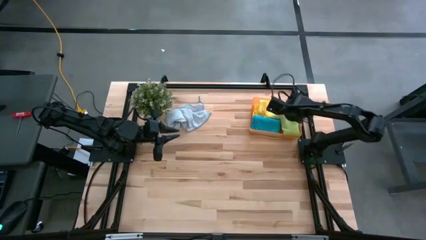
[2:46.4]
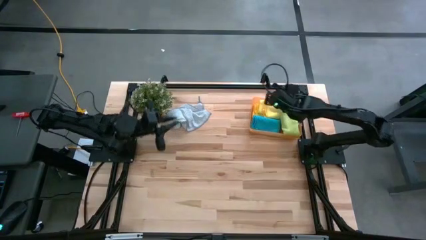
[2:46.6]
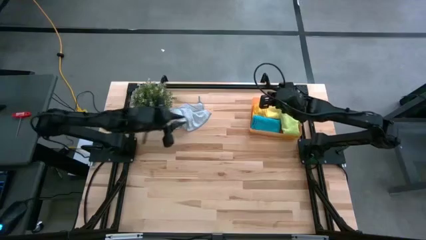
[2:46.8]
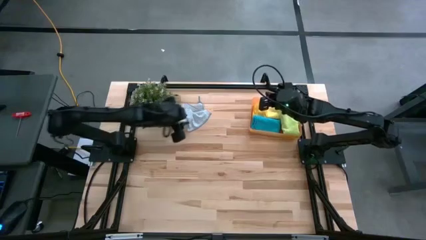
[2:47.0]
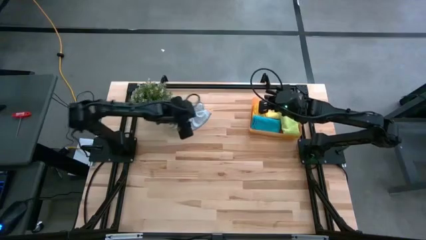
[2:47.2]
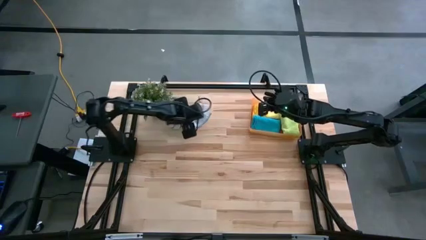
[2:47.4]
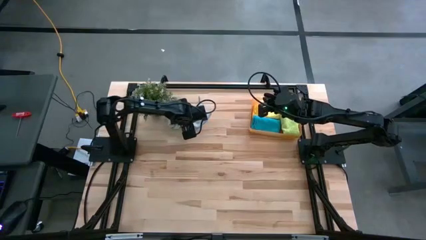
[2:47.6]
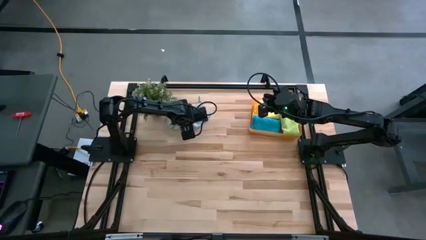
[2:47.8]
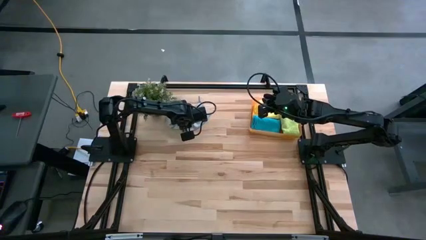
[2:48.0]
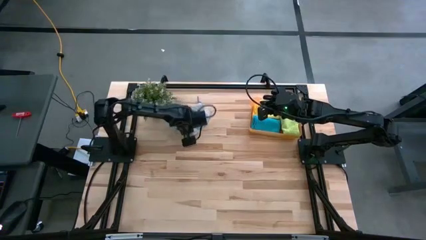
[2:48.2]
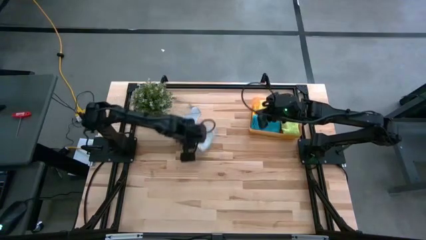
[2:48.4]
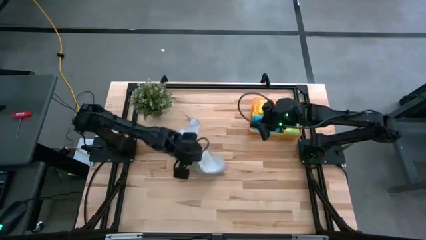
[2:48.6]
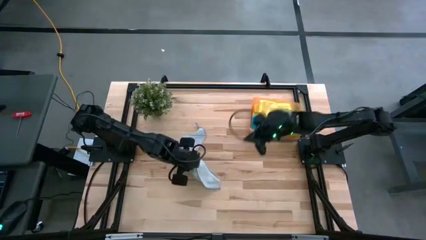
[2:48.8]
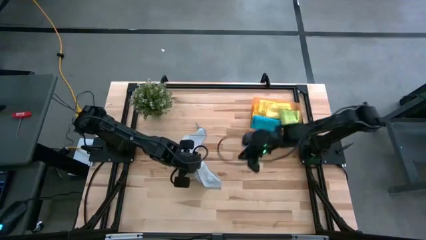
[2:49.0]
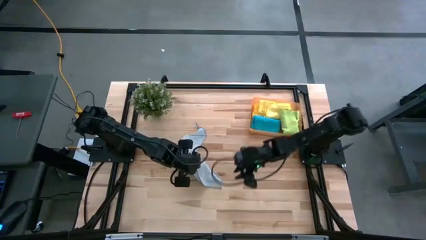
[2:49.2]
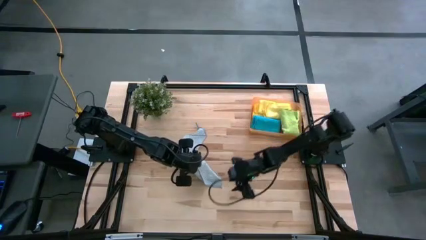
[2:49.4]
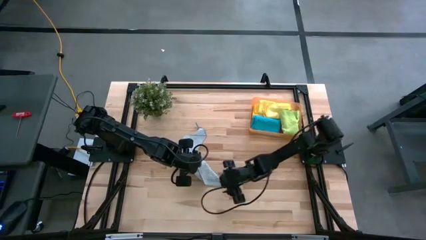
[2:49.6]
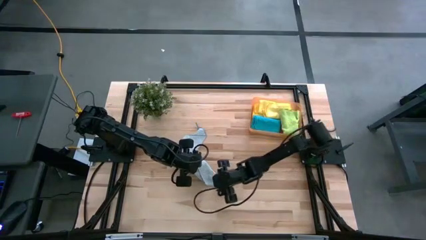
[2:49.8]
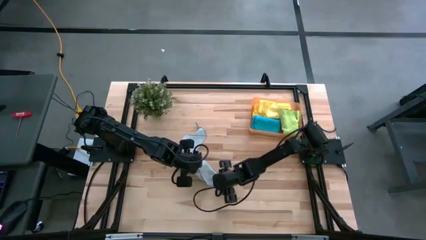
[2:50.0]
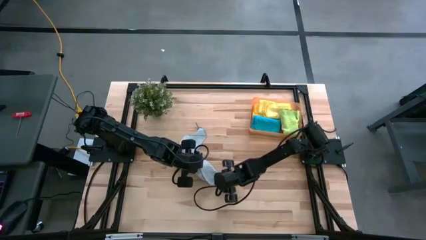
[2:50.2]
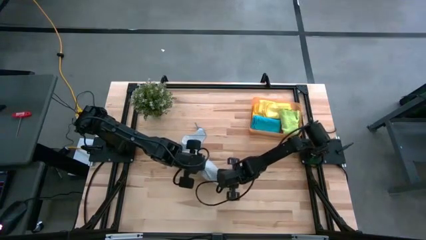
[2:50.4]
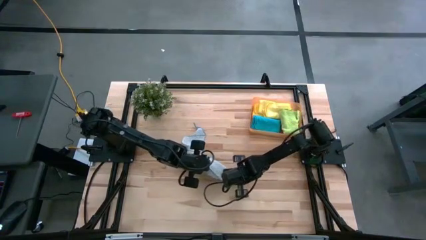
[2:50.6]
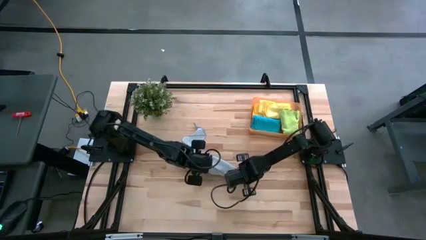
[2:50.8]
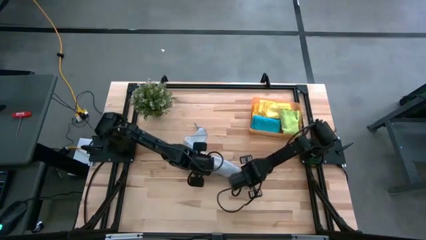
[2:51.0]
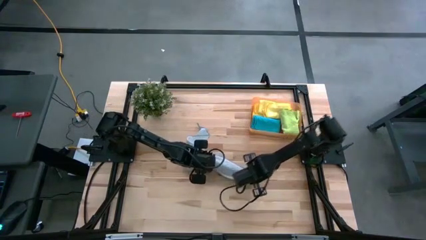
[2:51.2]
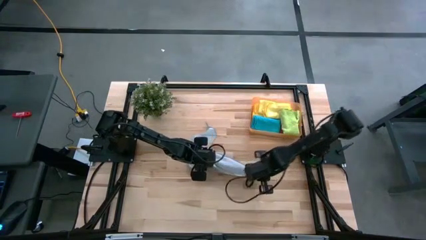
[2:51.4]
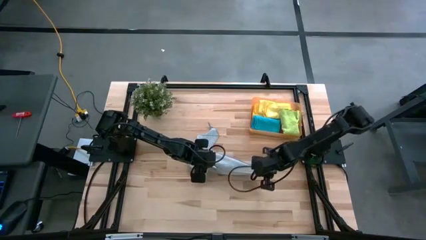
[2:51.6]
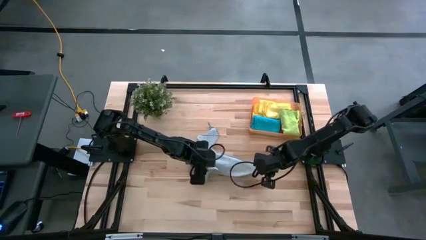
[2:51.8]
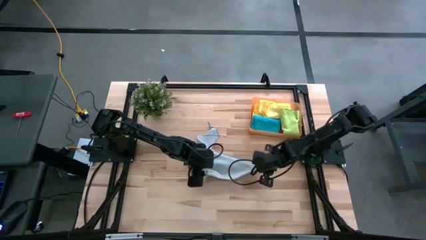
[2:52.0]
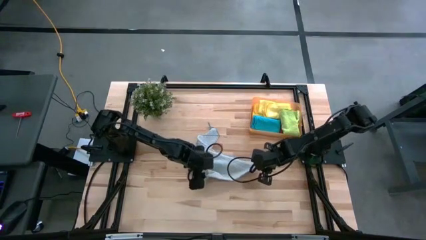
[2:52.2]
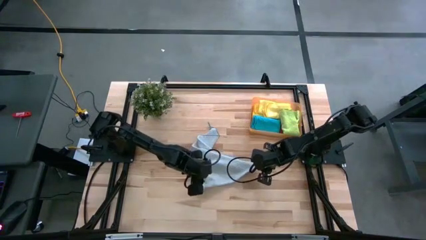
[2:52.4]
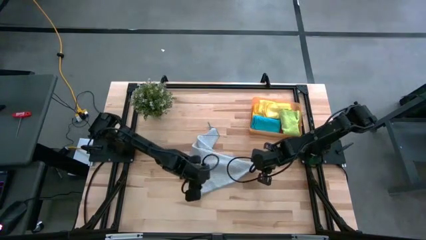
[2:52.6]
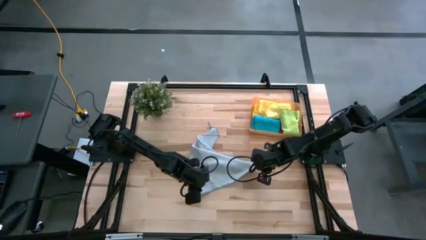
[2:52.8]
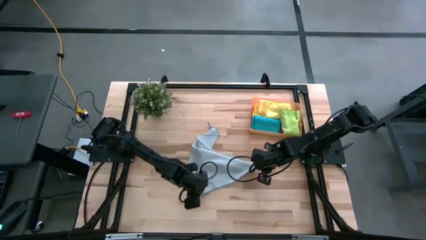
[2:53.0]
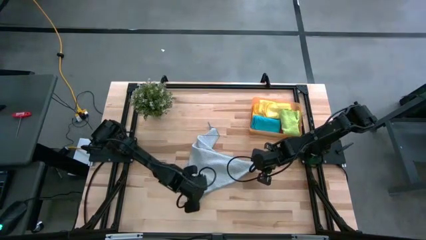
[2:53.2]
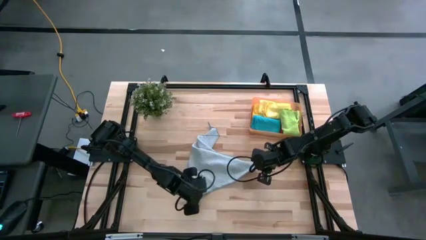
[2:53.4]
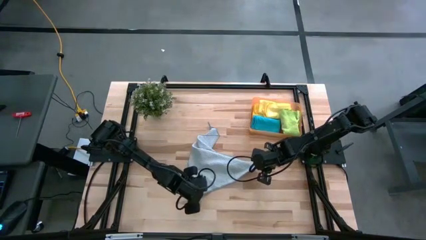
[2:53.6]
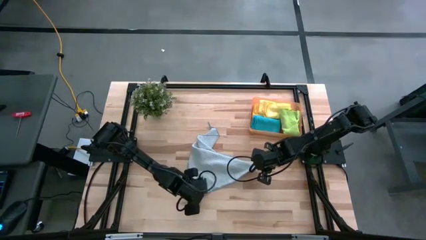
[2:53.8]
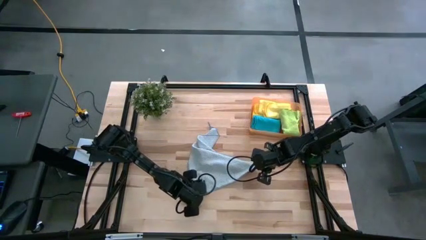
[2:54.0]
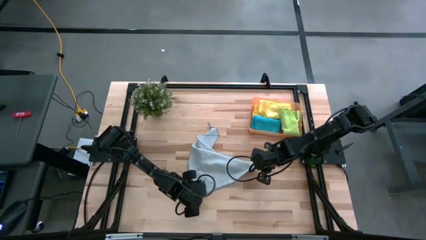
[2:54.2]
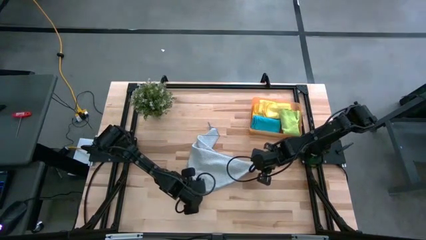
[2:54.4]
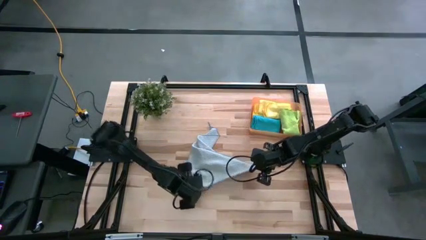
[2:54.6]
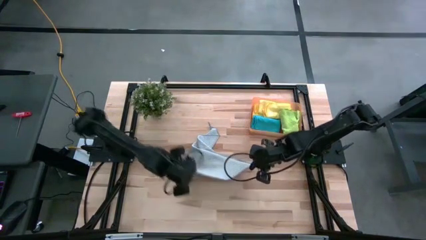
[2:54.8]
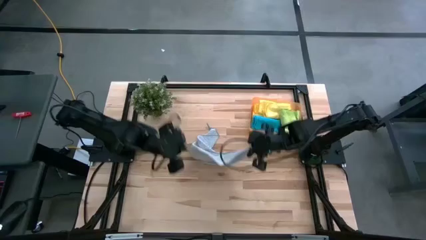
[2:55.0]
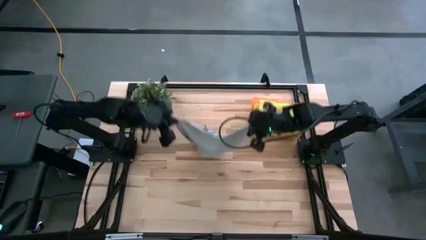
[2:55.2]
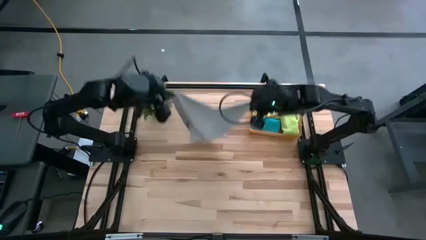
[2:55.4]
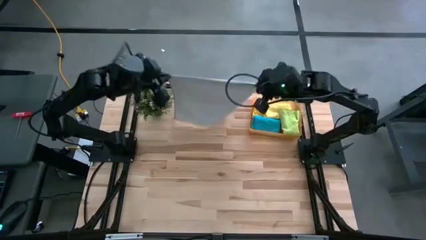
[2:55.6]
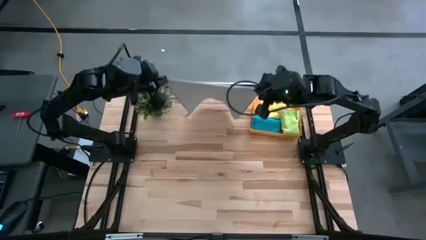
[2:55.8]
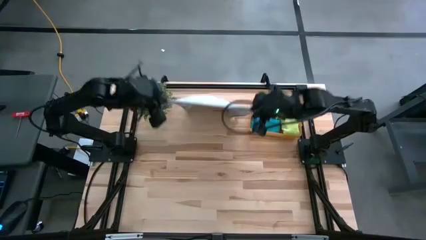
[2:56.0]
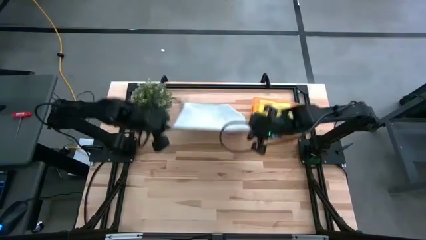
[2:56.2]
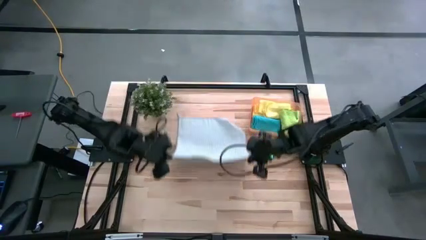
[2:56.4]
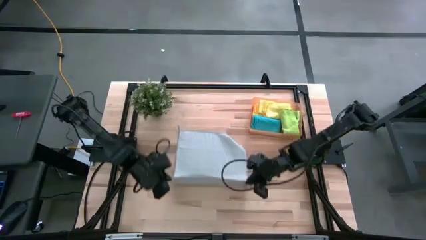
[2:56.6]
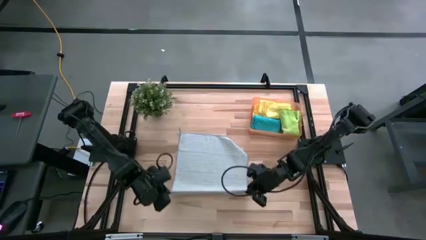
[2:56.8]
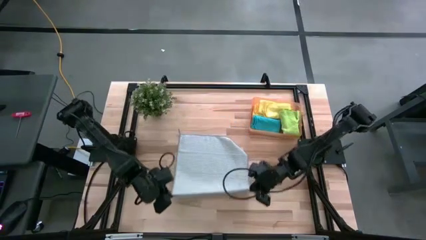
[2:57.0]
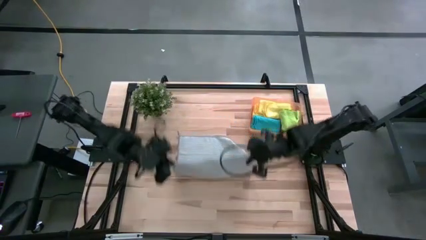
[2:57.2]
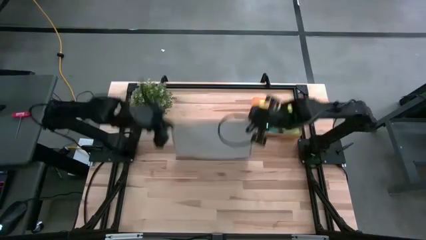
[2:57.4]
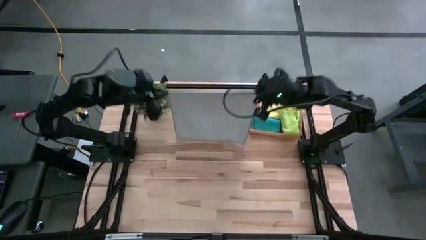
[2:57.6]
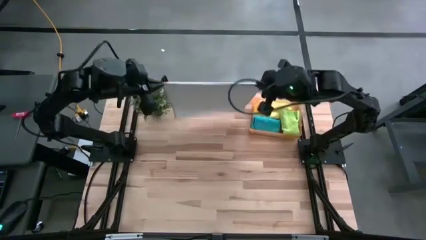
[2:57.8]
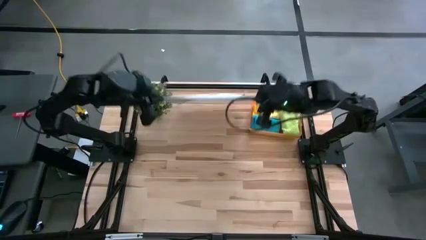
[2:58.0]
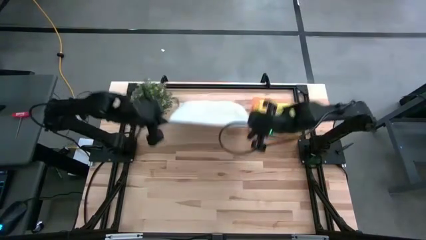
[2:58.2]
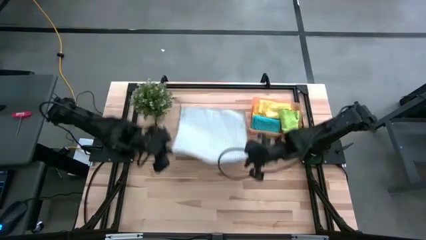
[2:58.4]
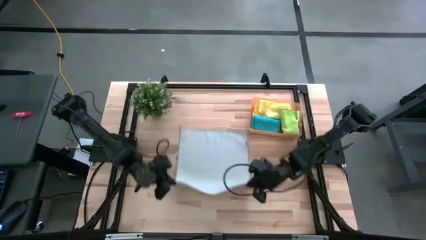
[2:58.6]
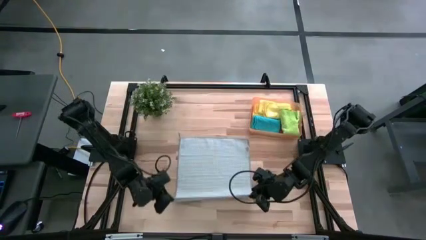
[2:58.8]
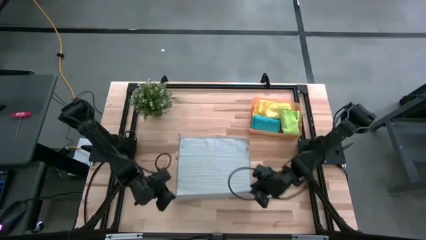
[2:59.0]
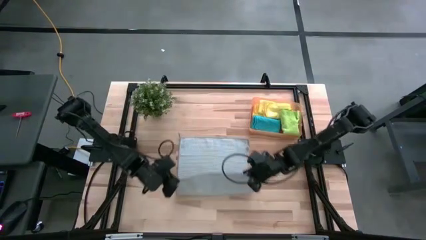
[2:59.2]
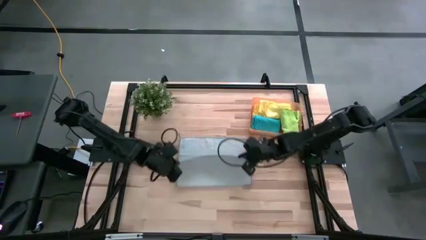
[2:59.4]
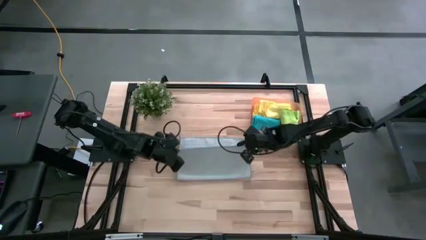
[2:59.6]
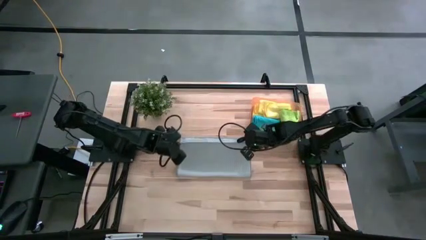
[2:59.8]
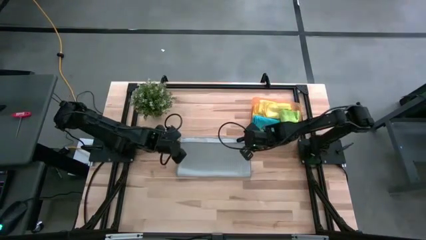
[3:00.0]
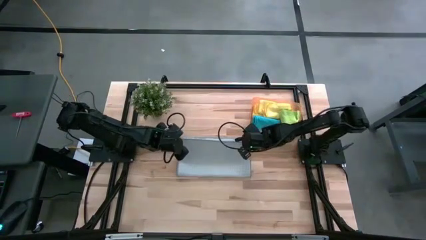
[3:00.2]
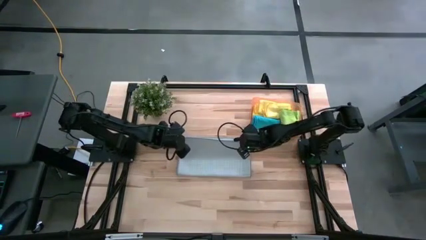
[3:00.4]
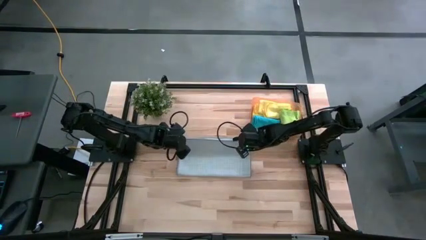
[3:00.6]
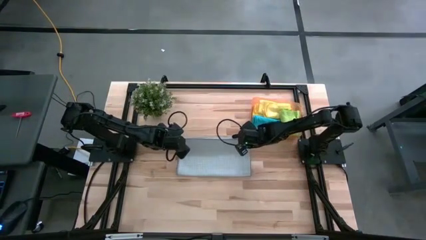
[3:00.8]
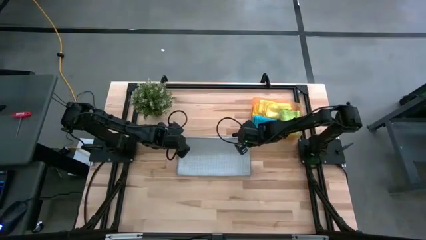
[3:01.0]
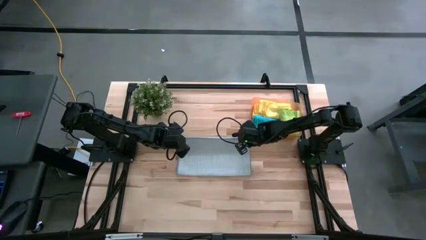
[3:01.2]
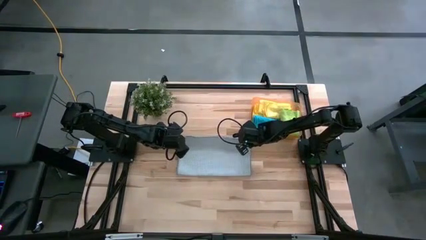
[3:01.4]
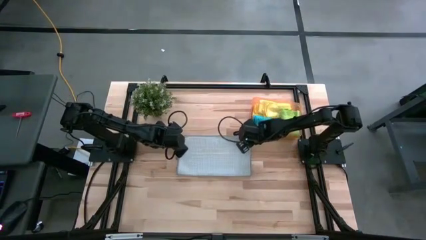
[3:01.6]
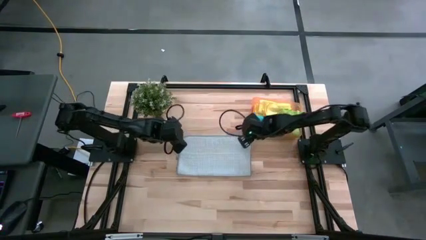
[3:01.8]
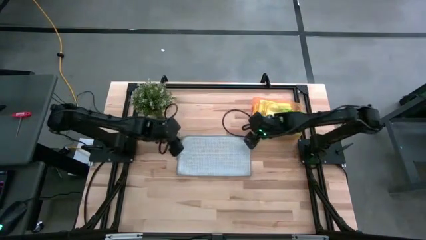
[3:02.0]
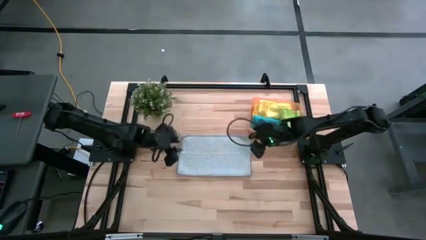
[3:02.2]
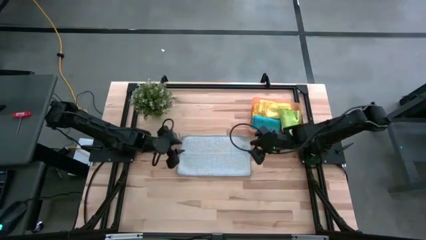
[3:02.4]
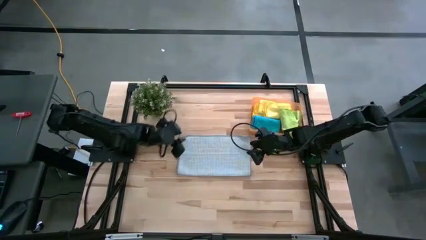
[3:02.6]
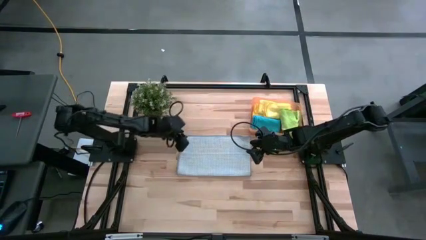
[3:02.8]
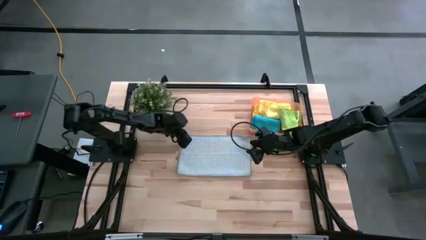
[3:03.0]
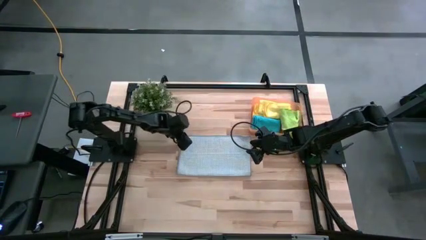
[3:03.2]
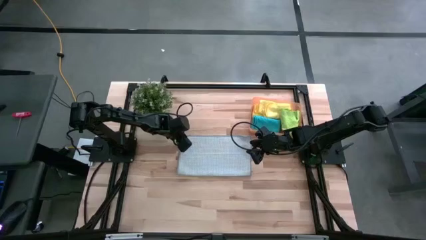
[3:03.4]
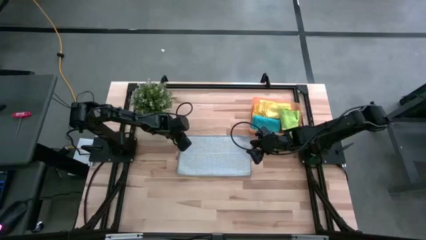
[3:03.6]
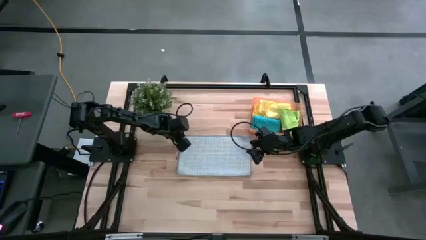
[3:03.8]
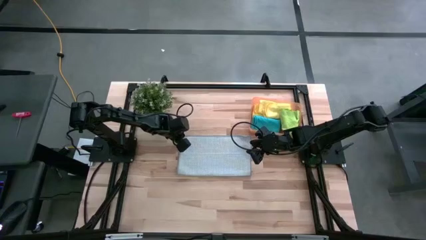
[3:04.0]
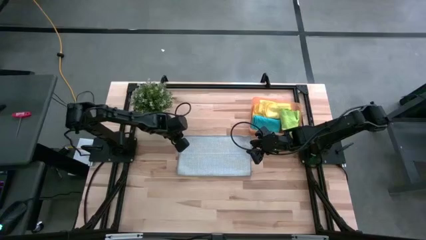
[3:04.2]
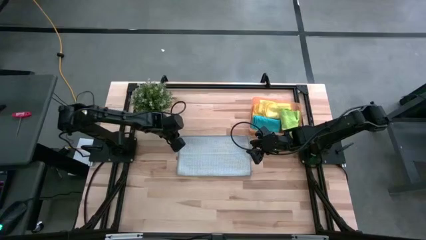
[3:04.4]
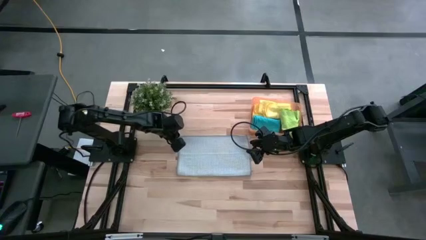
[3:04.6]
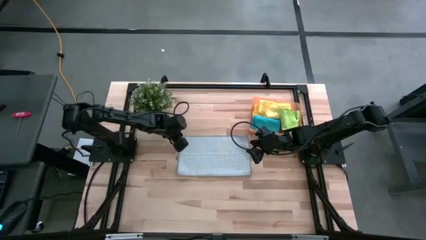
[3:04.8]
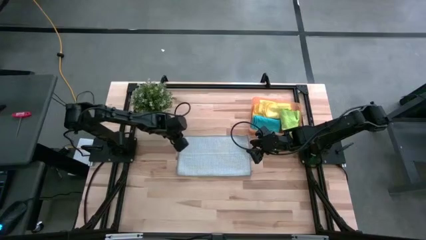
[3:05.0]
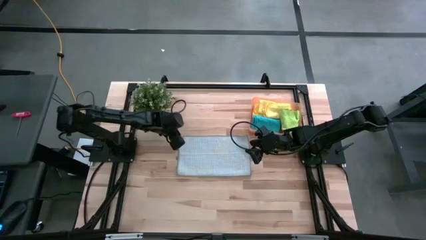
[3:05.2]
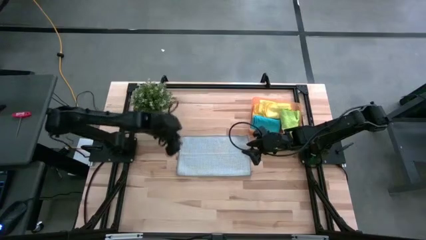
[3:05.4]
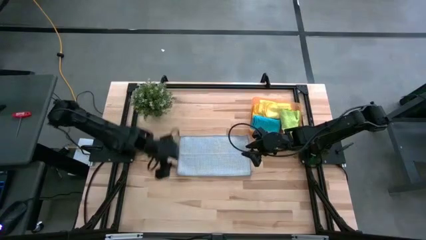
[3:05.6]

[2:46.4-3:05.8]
Task: Fold microfiber towels
Fold the gray microfiber cloth
